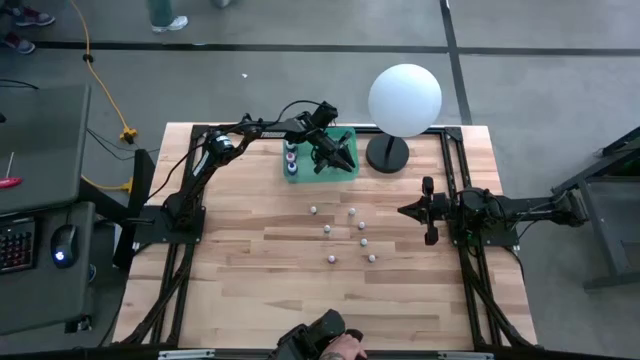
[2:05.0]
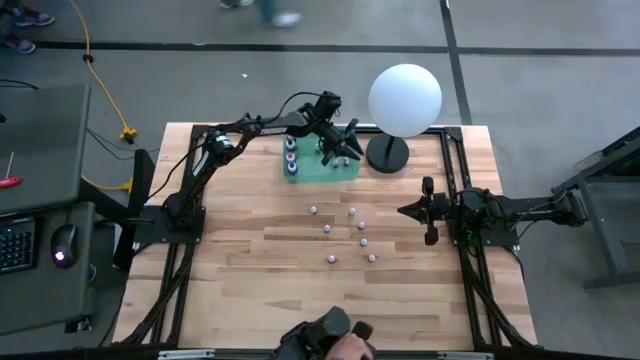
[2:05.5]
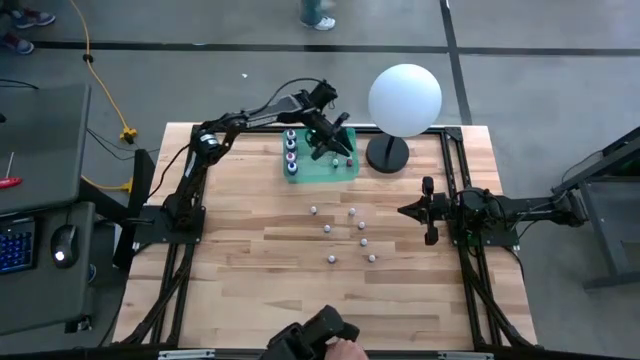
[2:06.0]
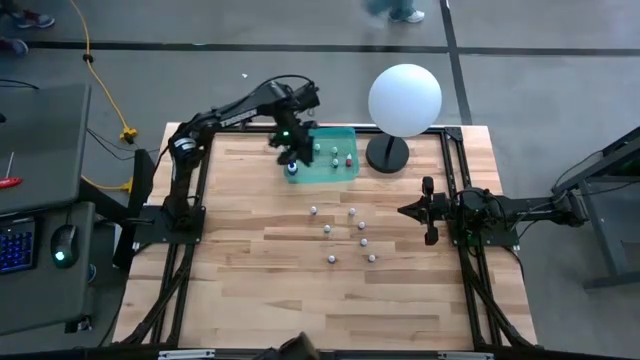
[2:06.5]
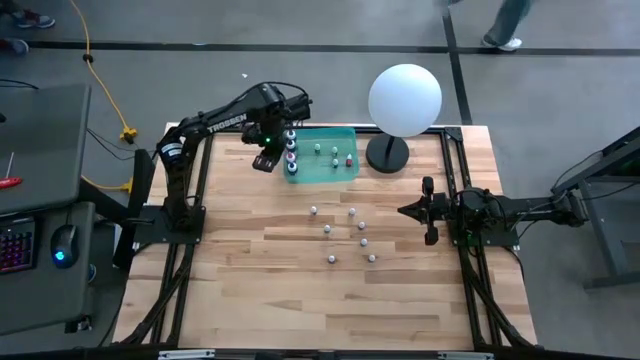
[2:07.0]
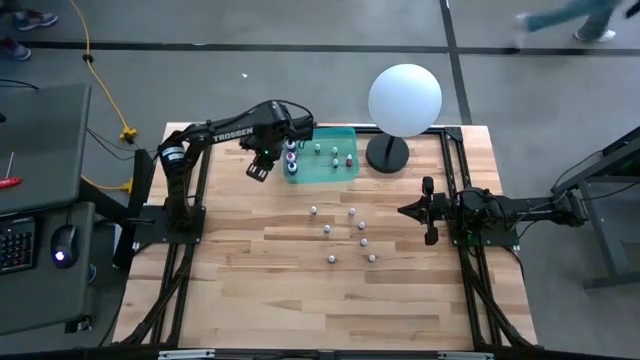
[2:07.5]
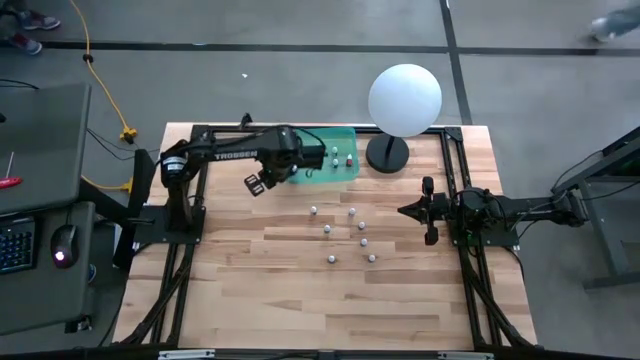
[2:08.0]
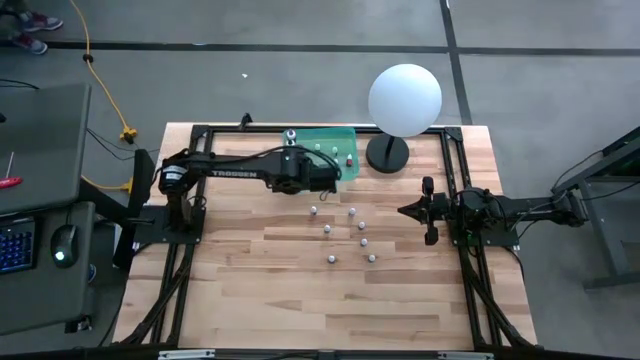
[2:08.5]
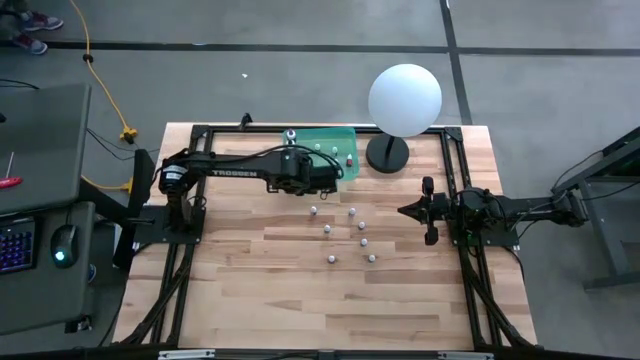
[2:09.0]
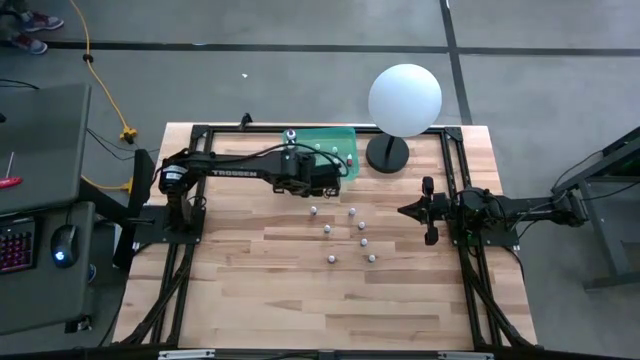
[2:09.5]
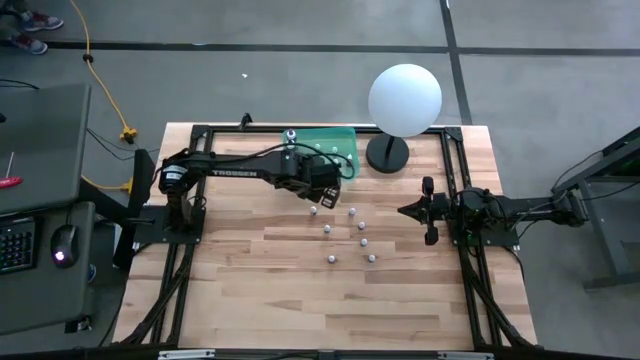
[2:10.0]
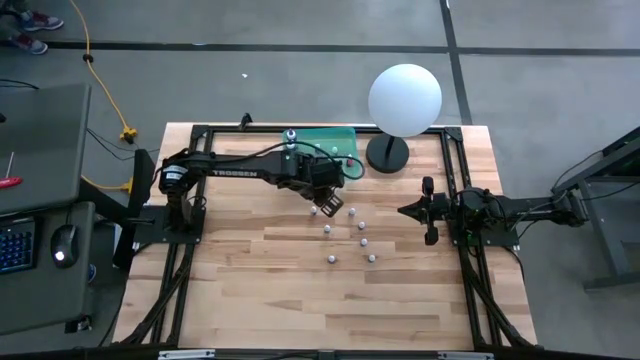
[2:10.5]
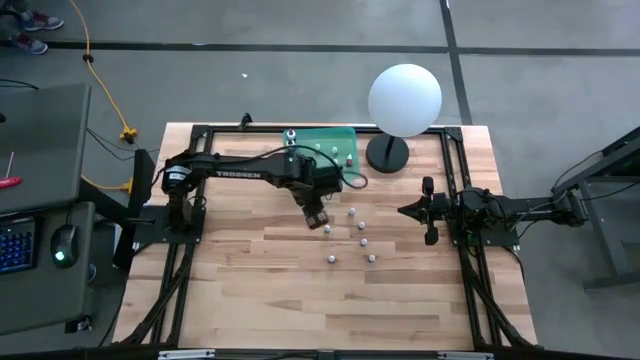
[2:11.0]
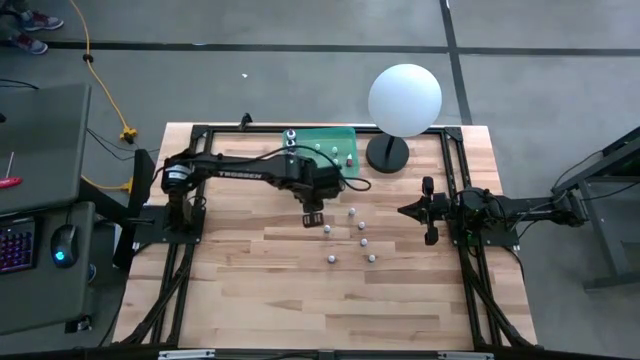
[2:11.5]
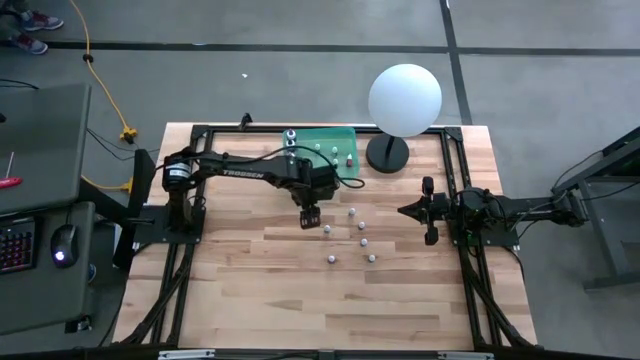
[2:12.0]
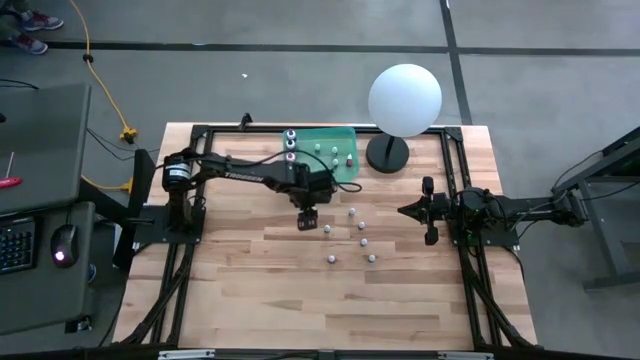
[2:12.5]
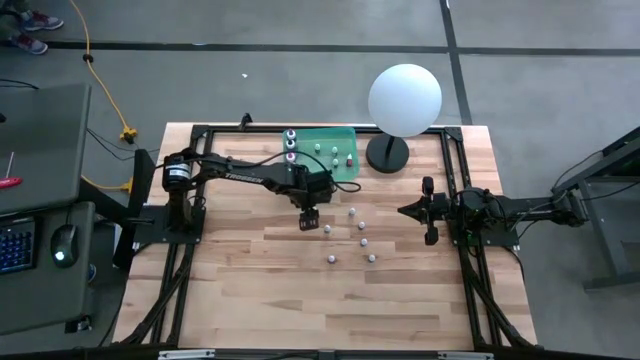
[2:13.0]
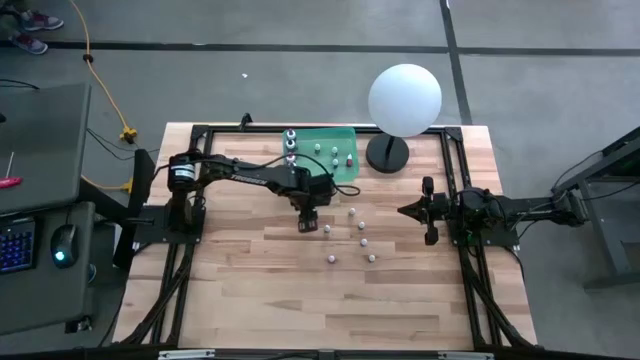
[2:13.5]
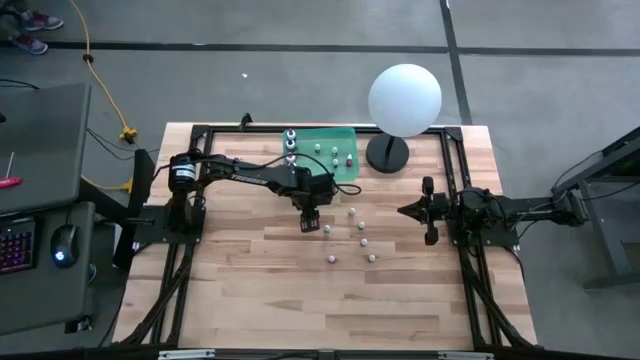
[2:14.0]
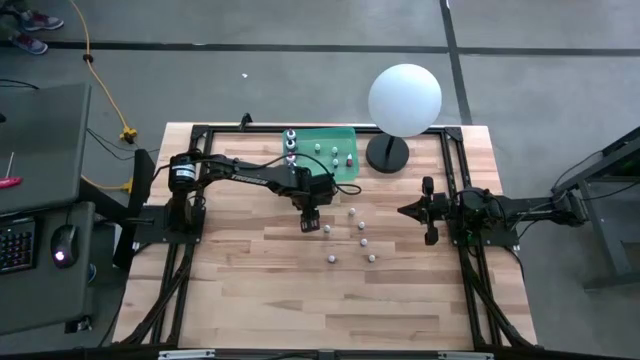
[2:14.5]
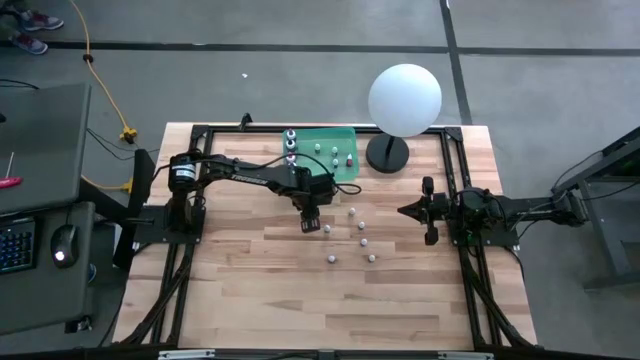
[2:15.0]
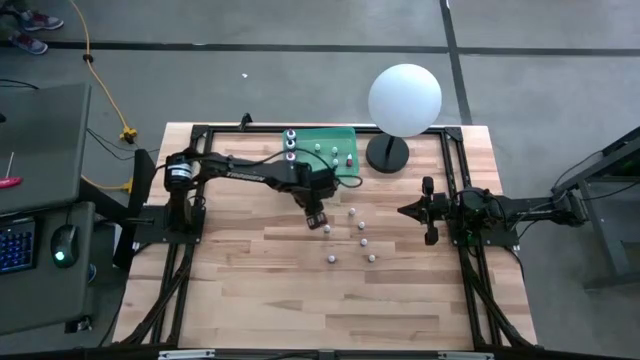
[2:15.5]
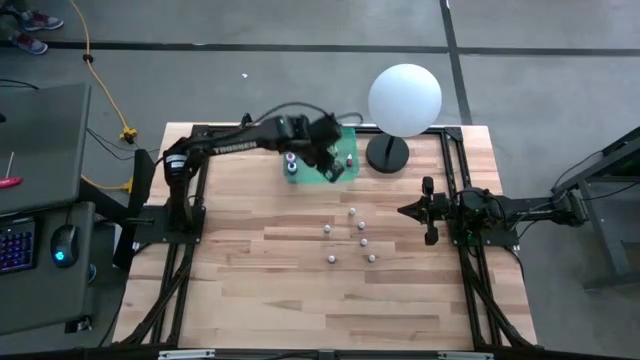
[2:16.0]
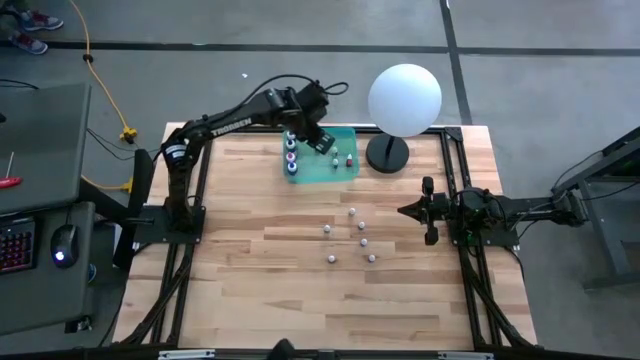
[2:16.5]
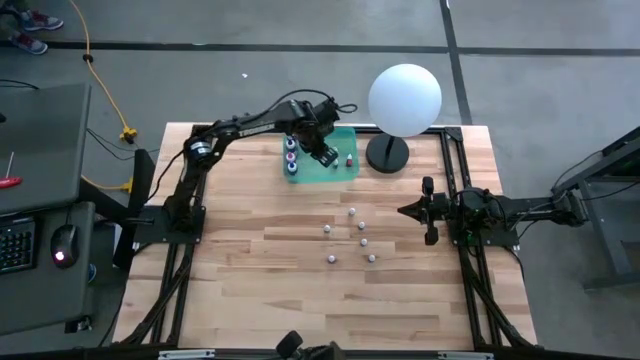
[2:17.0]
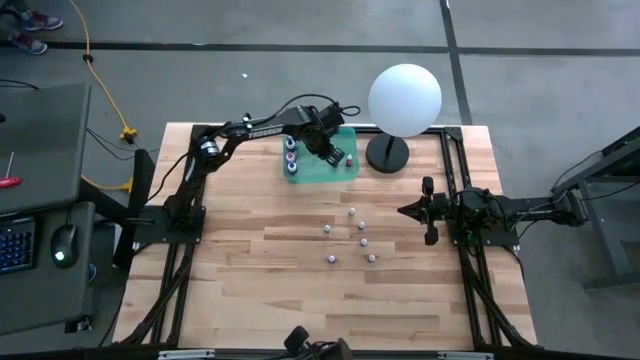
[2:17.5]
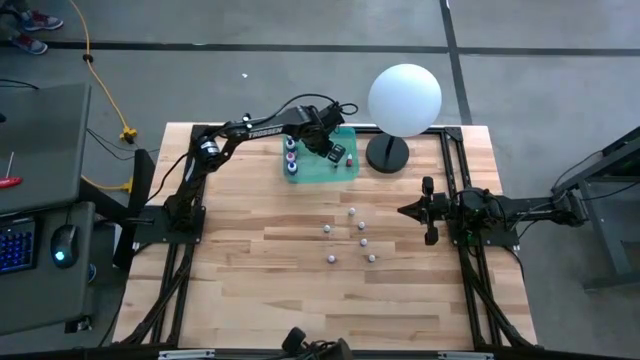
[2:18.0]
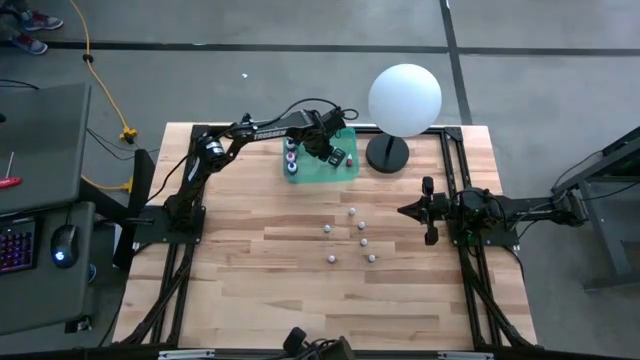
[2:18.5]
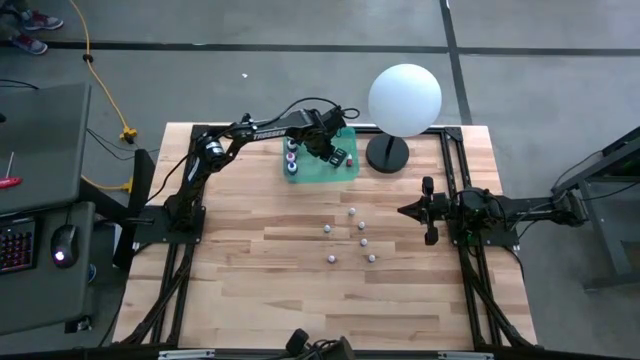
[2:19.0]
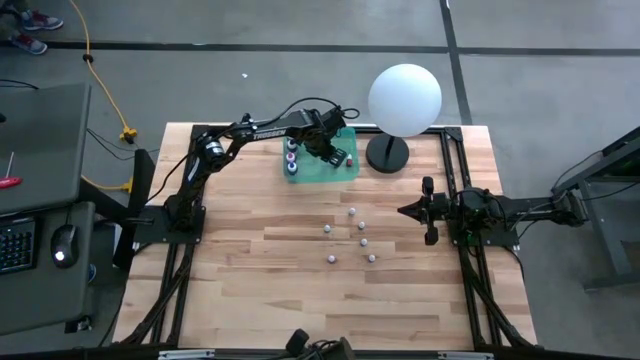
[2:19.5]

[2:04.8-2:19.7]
Task: Pick & Place food coloring
Put the small orange food coloring bottle into the green bin

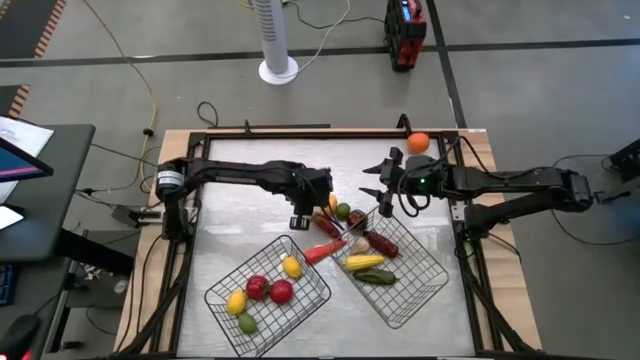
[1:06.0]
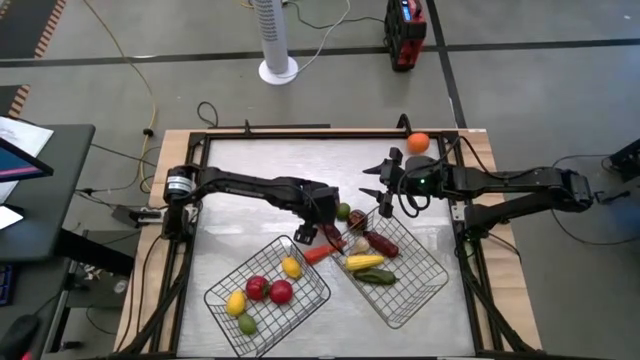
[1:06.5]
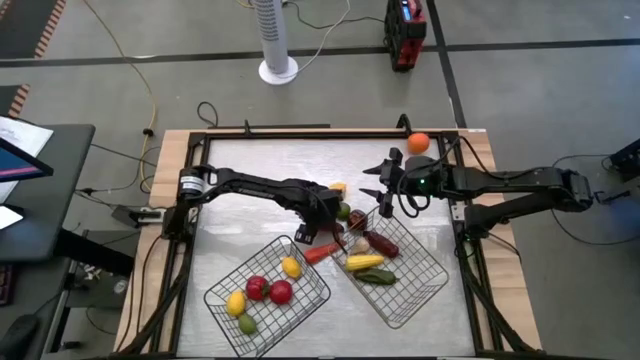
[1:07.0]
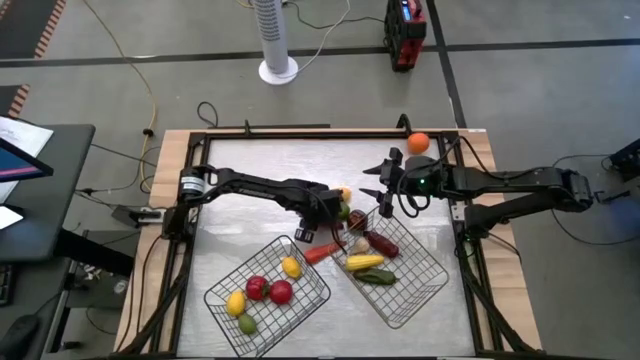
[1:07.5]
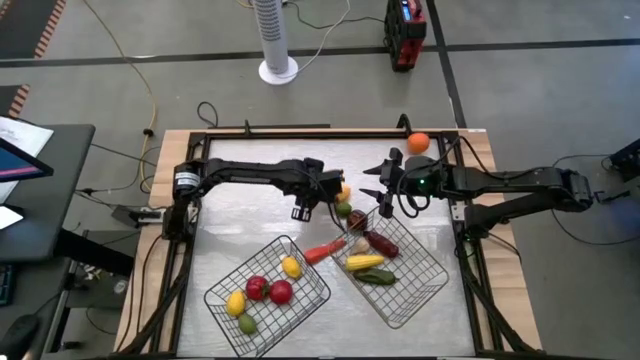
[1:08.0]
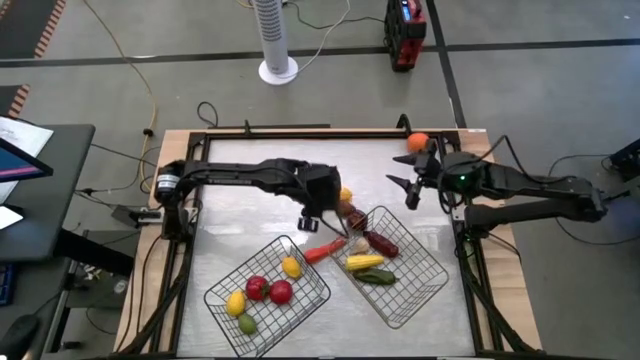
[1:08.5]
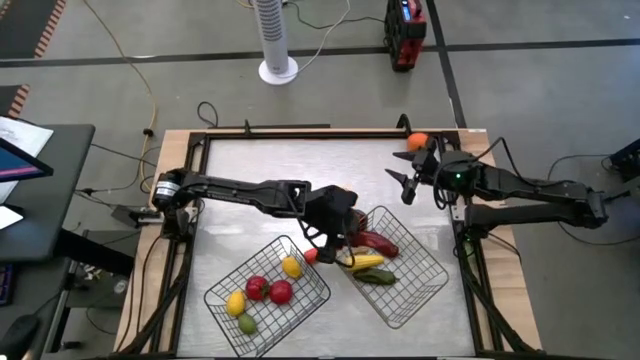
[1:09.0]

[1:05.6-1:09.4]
Task: Sort produce into baskets
Put the red chili pepper into the gold wire basket

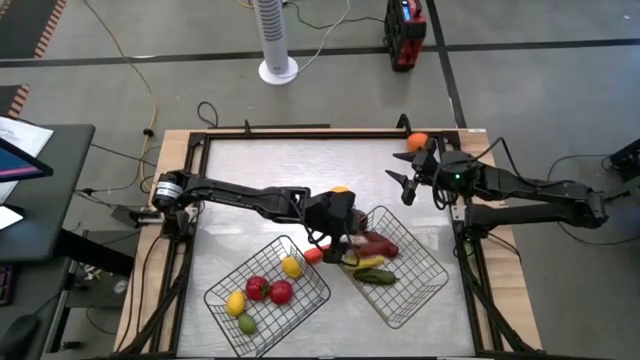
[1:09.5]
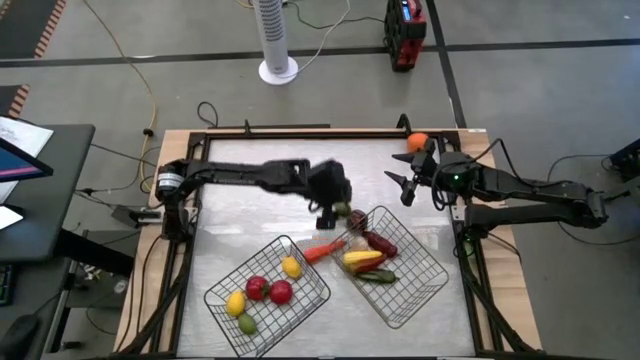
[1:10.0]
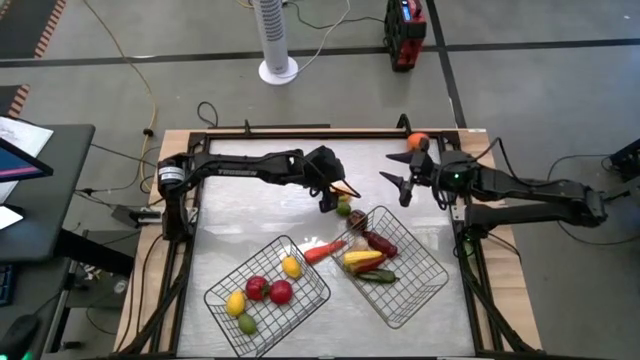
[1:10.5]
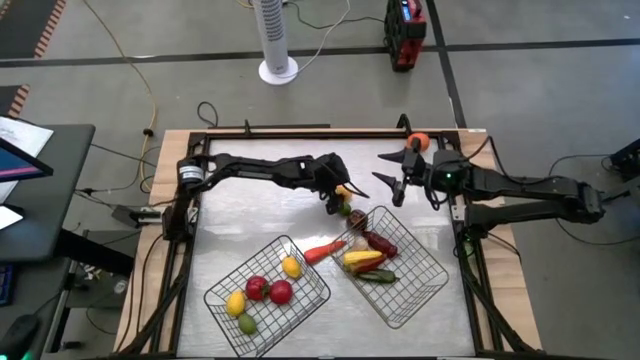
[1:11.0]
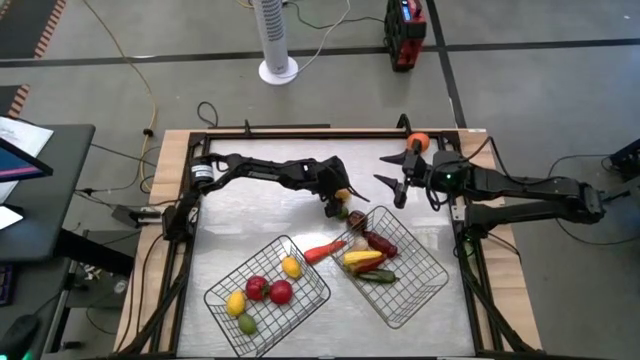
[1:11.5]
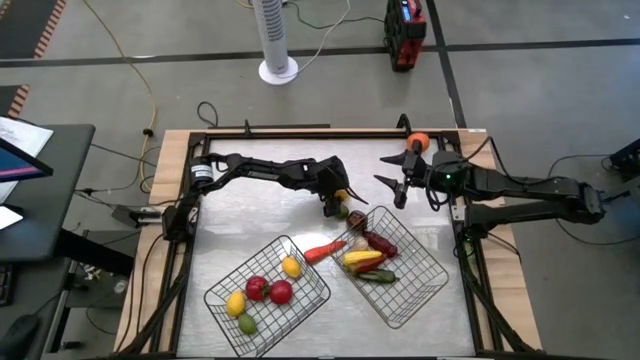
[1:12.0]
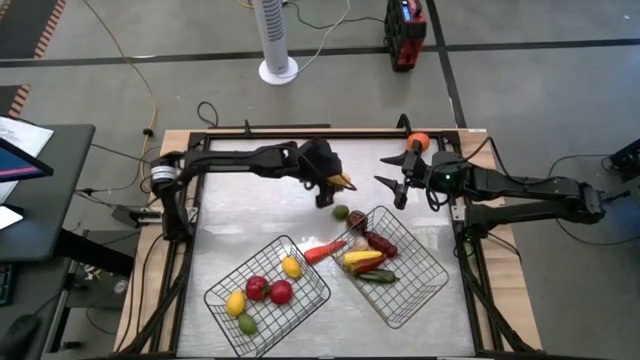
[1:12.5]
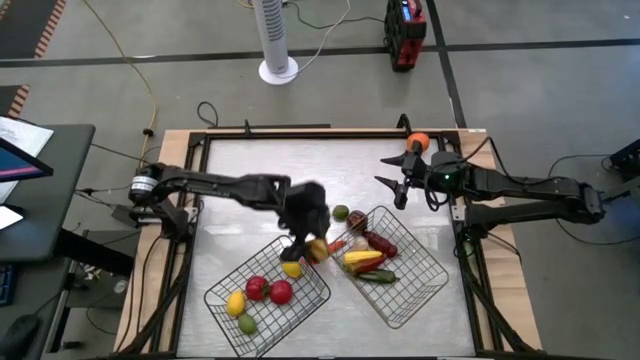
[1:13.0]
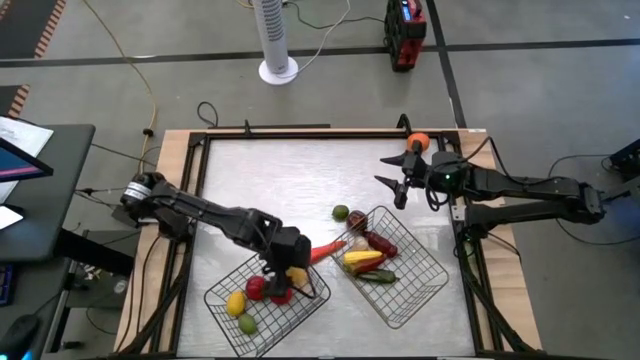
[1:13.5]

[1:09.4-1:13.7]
Put the yellow lemon into the black wire basket
